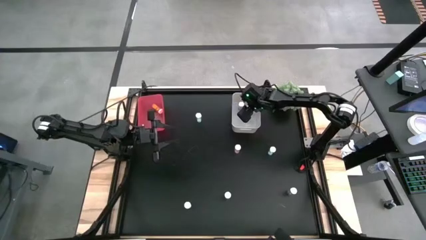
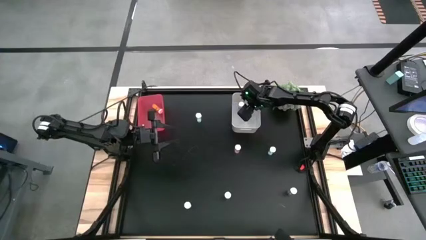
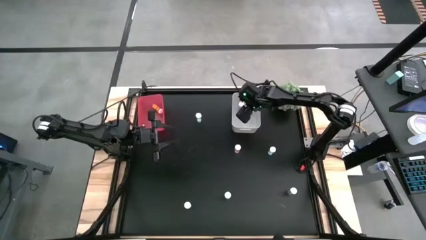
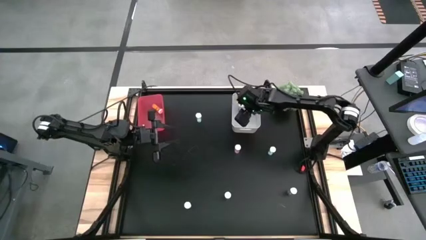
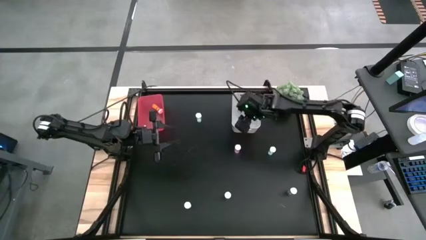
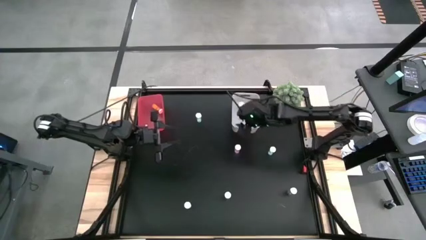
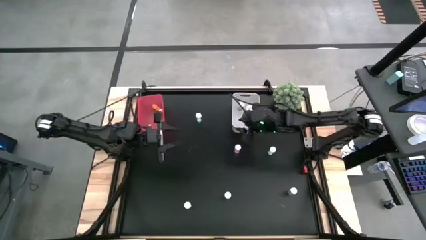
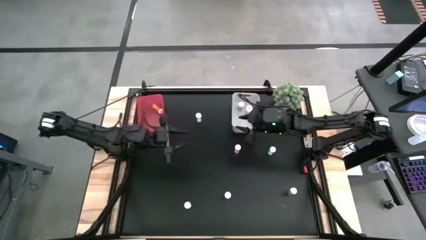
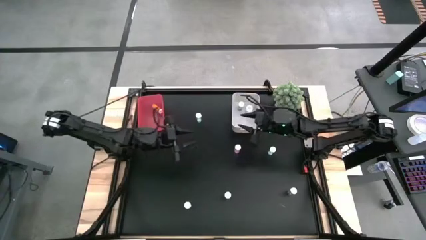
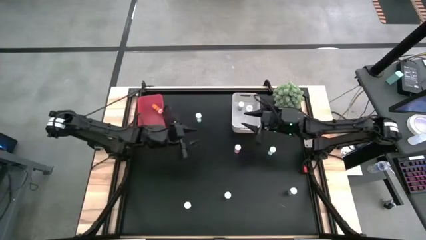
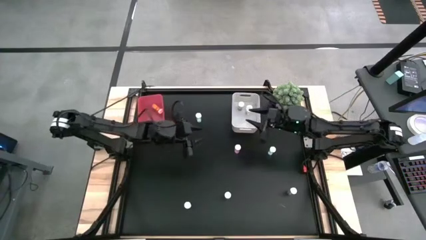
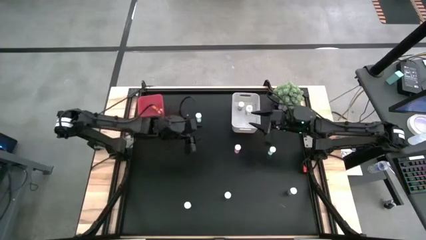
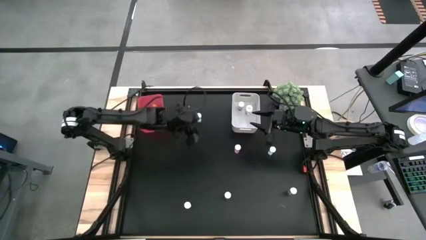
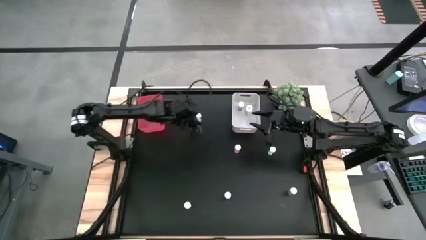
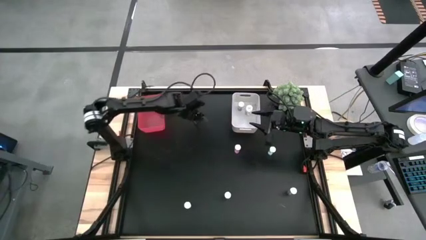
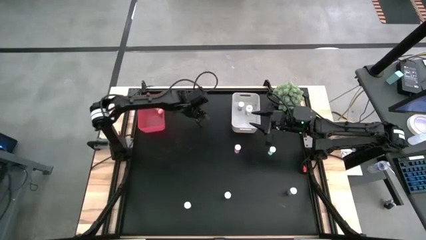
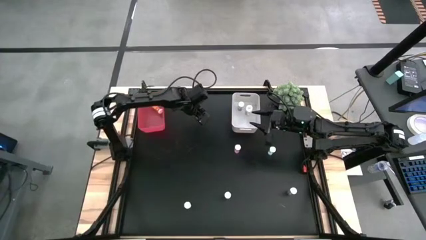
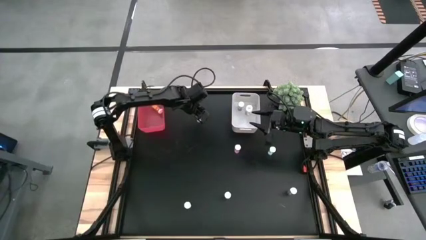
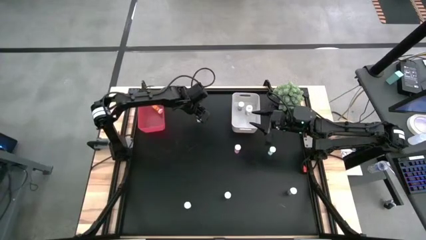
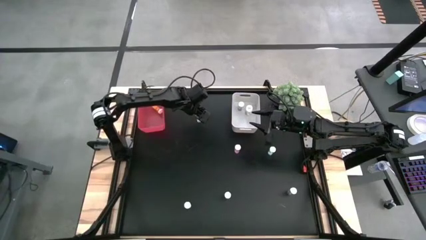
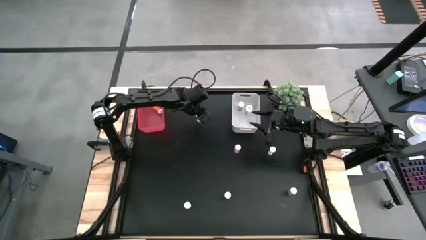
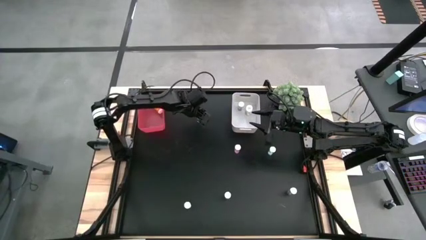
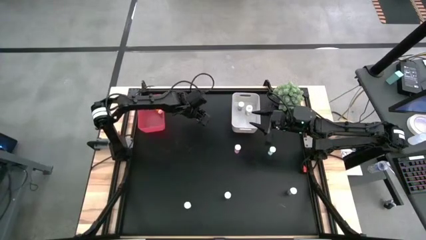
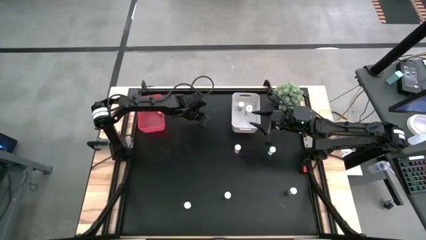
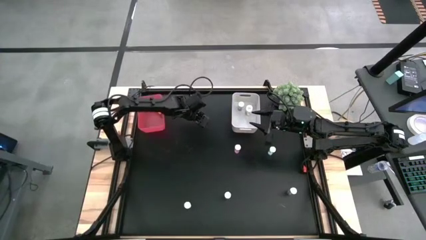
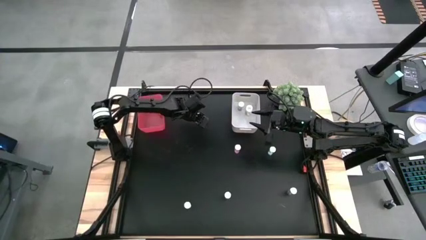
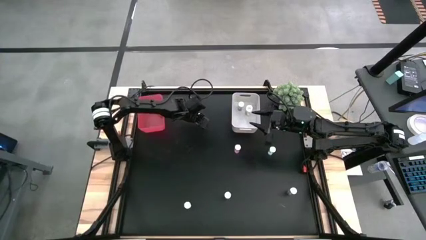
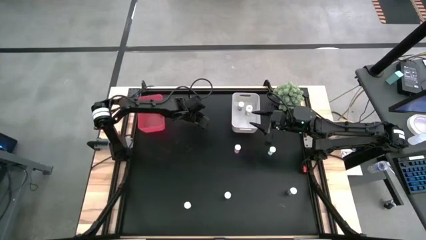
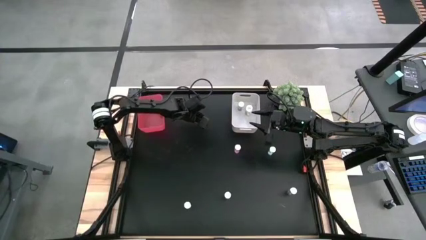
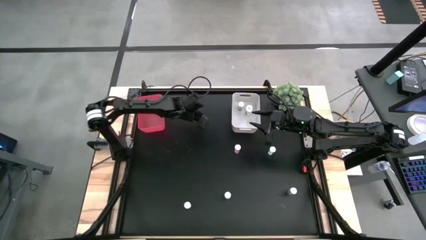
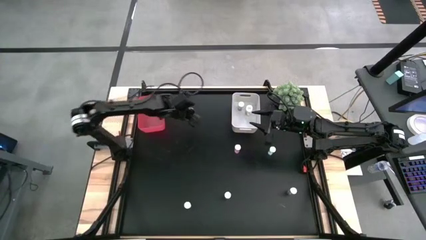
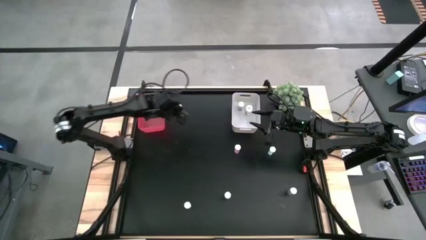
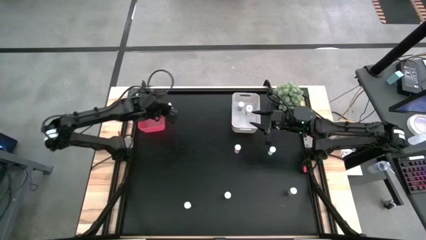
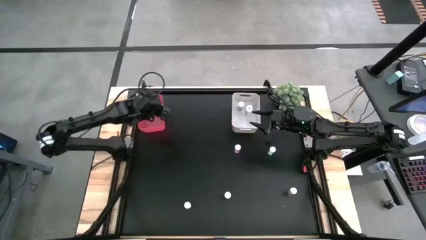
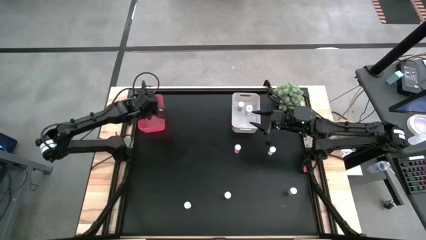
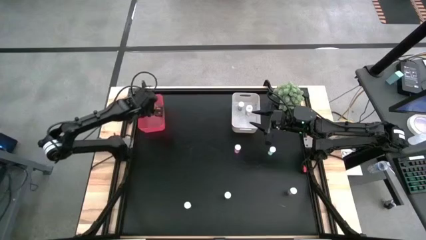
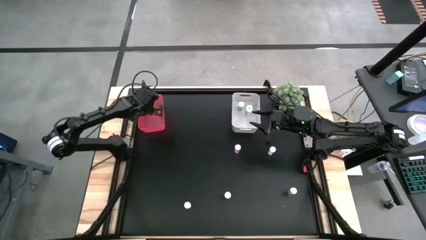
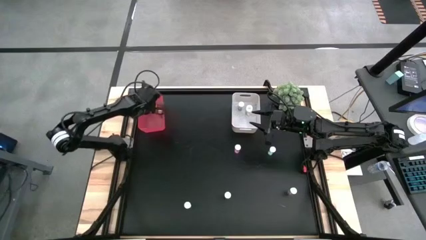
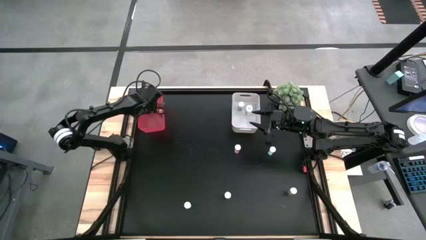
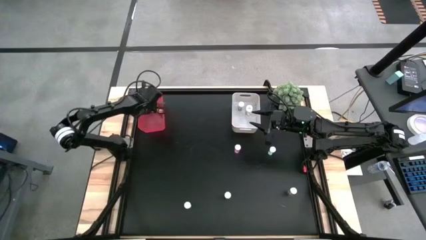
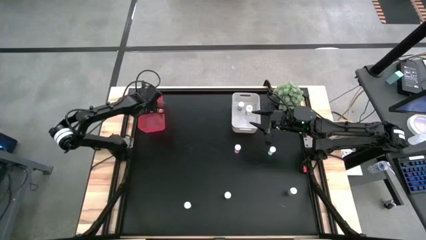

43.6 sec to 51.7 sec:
Task: Pick and place medicine bottles into bin by pill shape (circle, oval)
Put the green tablet bottle into the red bin

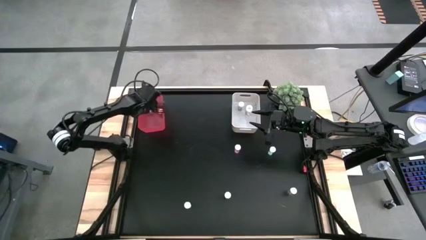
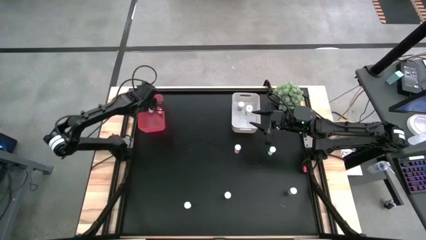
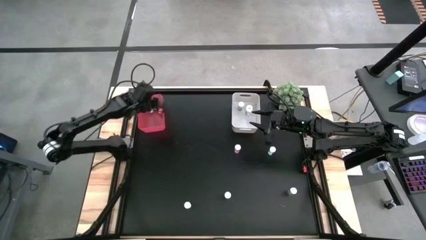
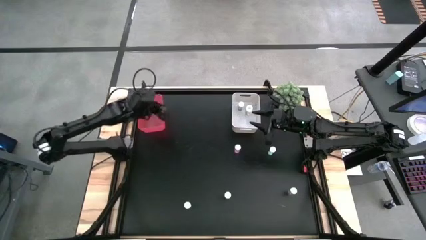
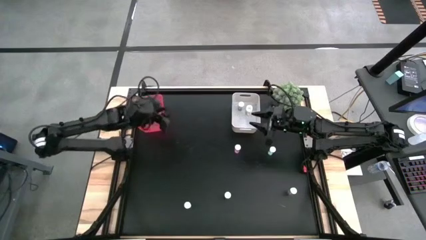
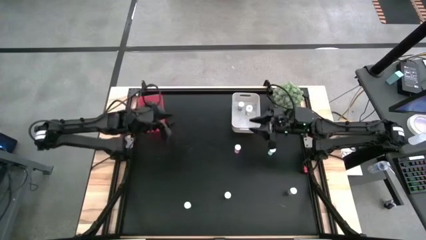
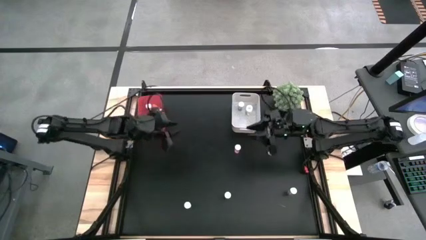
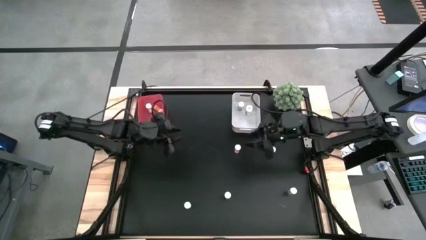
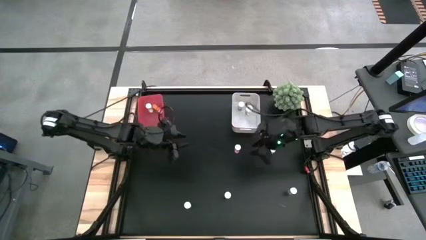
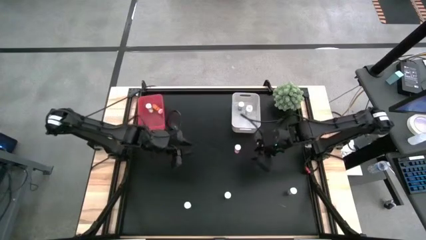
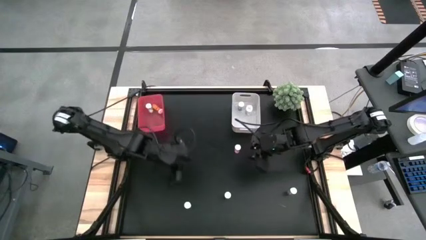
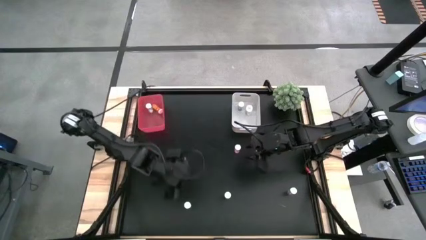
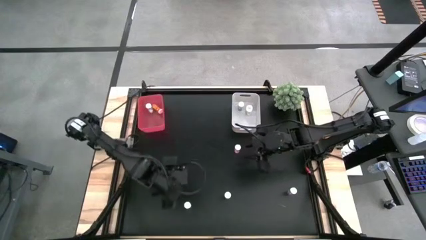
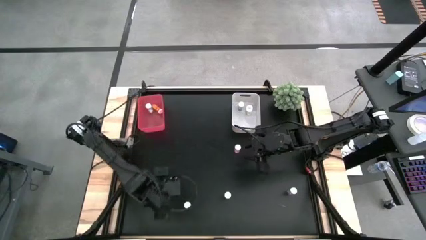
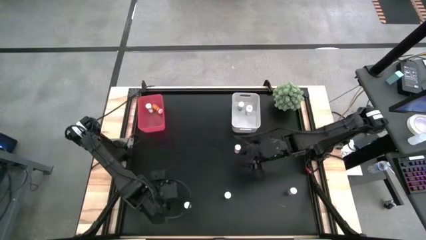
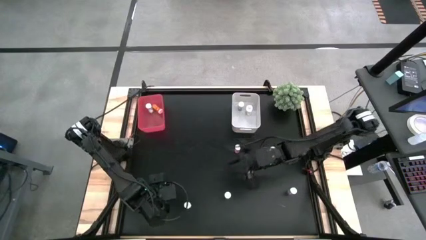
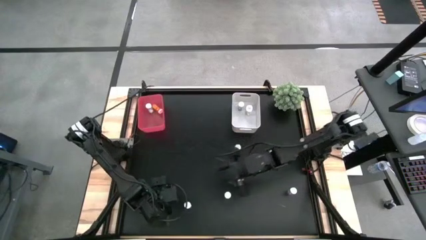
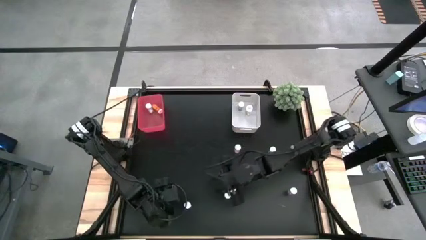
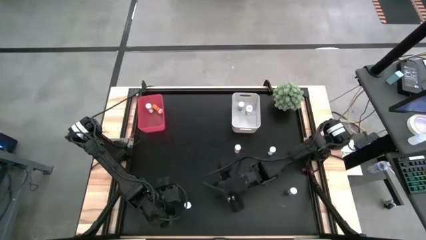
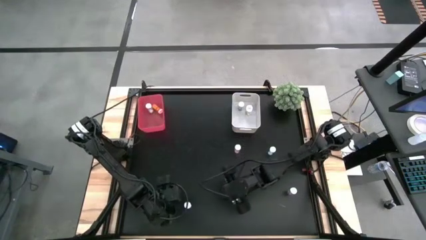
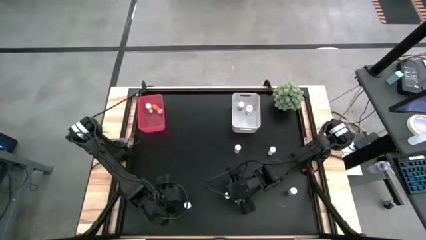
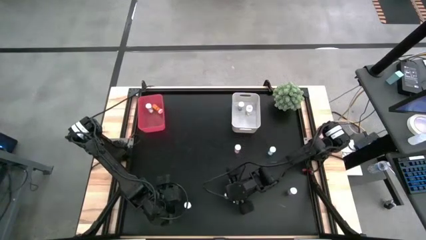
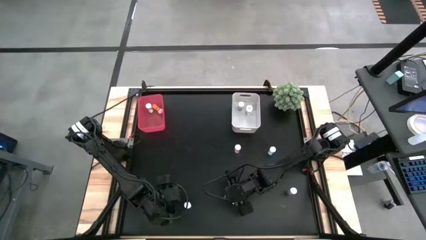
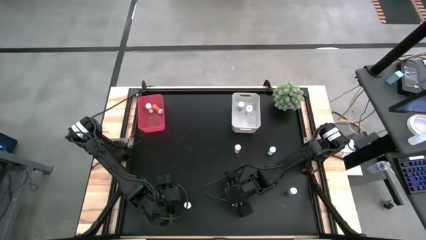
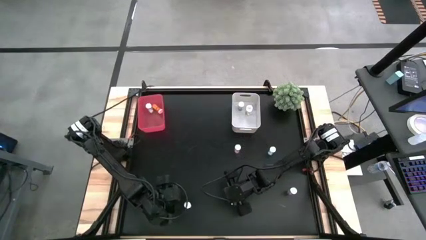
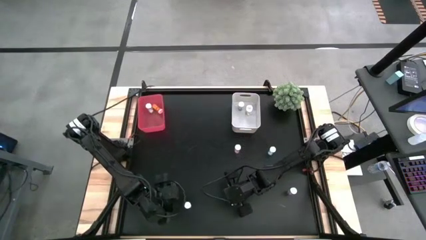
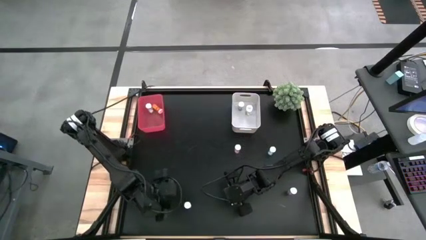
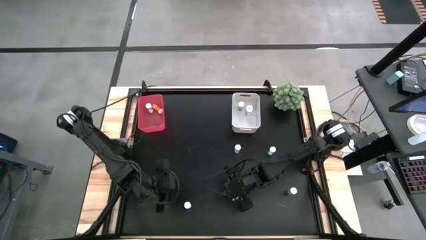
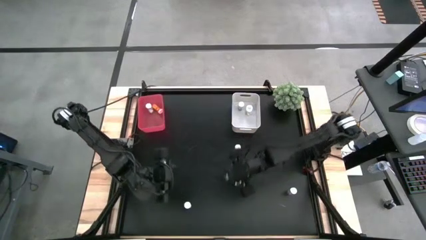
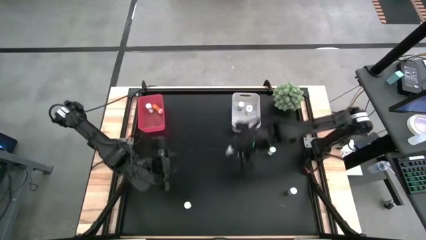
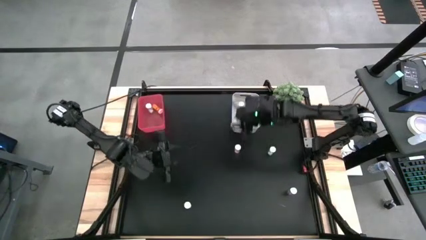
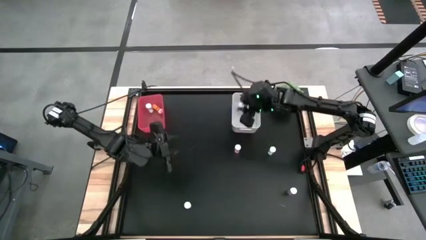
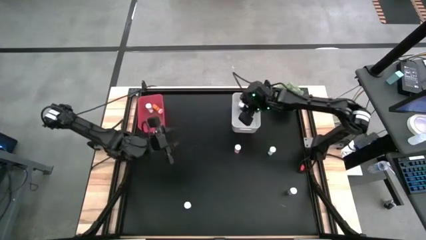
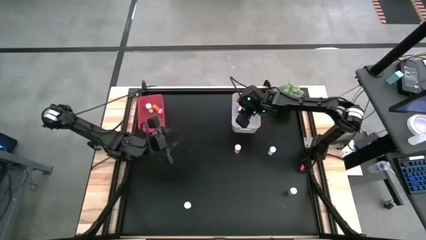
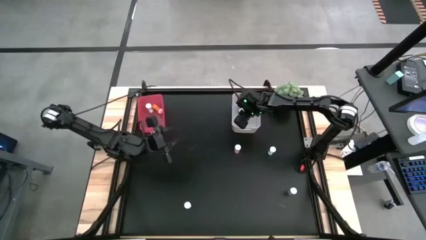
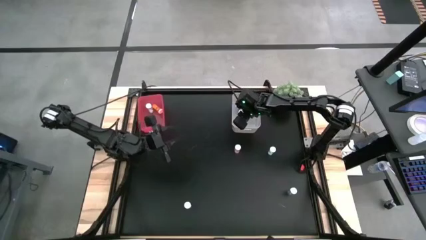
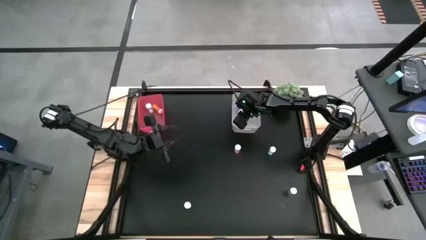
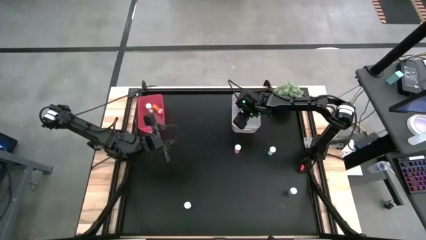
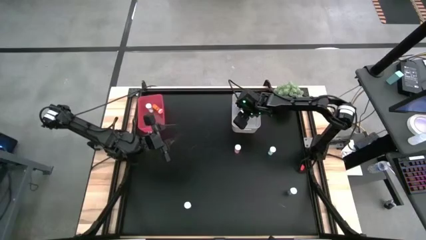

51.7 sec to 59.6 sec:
Put the blue capsule bottle into the white bin
